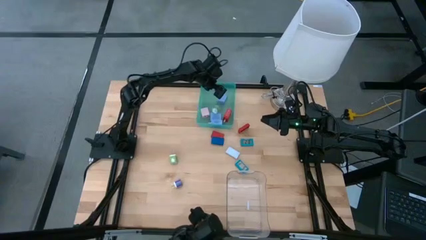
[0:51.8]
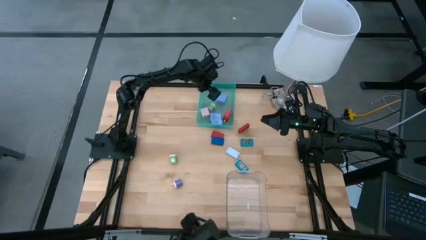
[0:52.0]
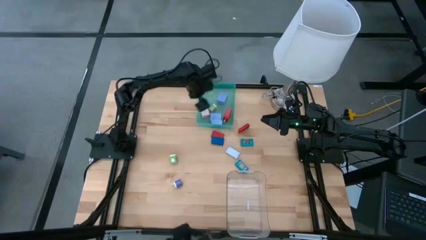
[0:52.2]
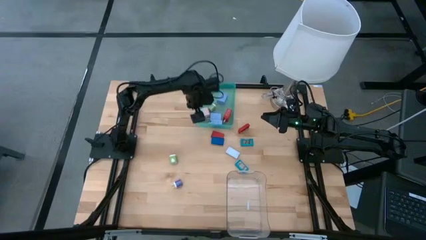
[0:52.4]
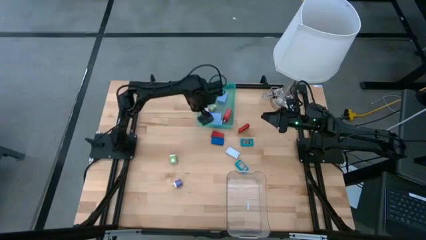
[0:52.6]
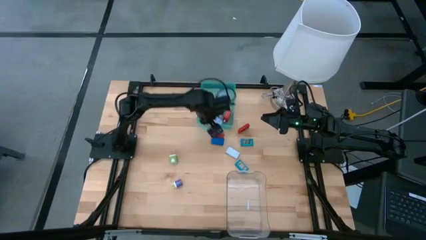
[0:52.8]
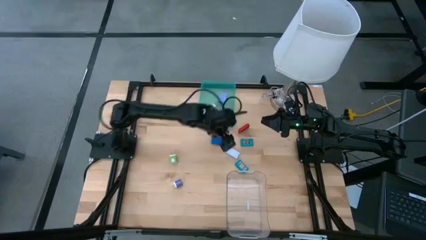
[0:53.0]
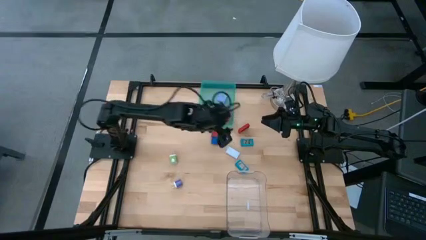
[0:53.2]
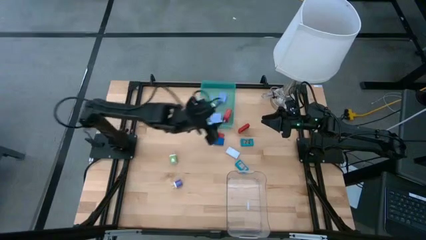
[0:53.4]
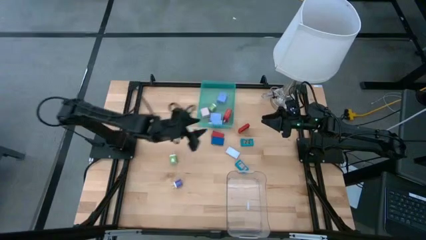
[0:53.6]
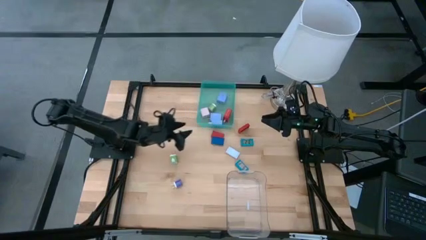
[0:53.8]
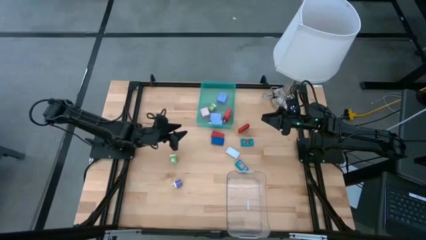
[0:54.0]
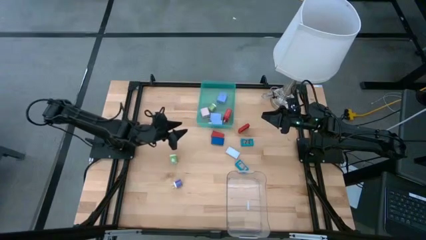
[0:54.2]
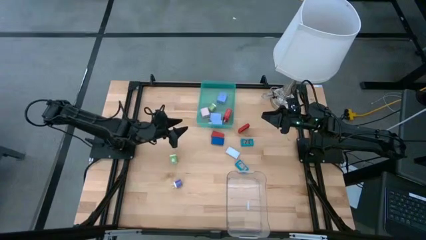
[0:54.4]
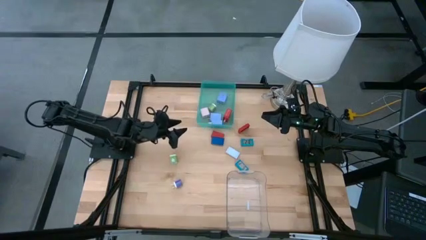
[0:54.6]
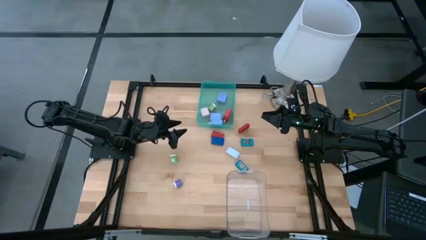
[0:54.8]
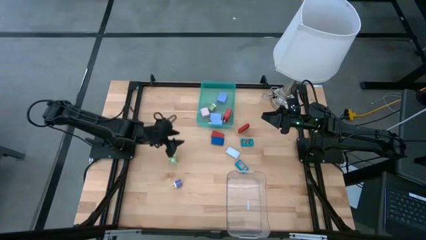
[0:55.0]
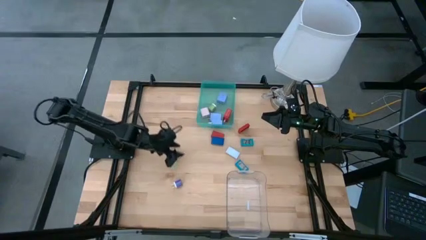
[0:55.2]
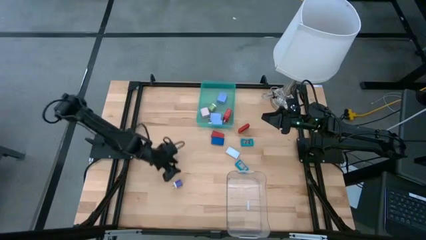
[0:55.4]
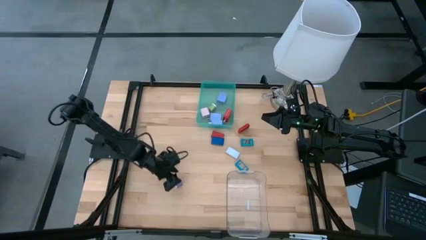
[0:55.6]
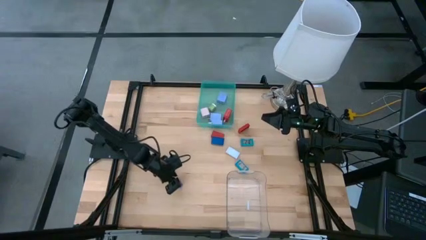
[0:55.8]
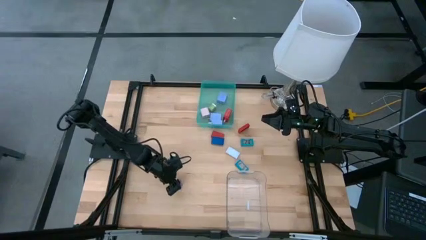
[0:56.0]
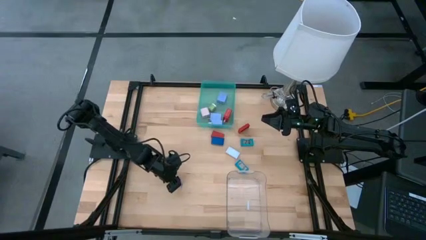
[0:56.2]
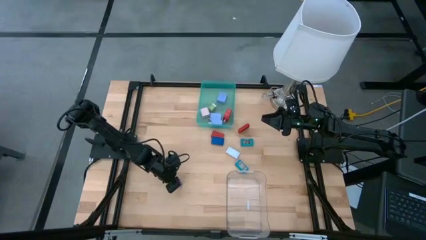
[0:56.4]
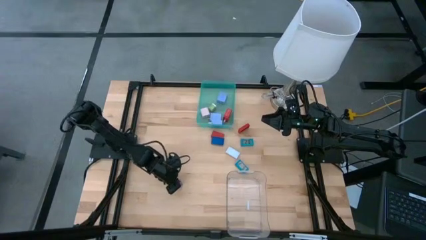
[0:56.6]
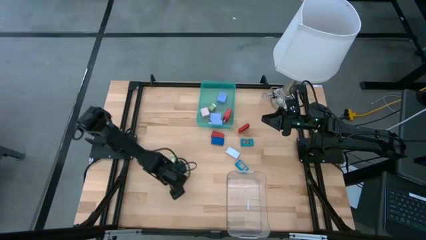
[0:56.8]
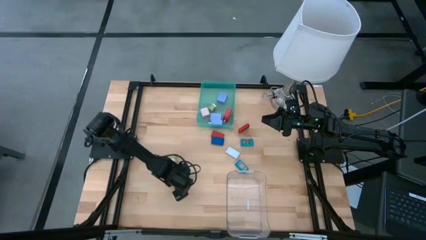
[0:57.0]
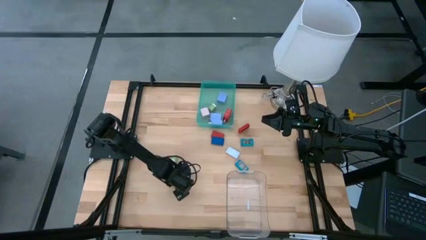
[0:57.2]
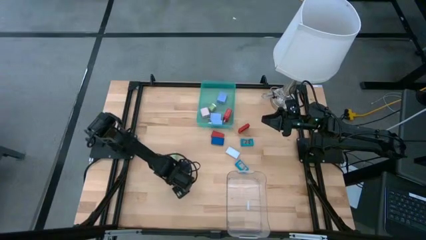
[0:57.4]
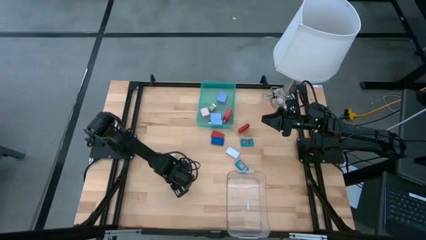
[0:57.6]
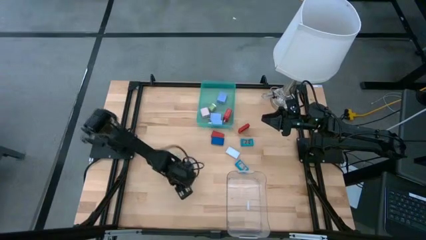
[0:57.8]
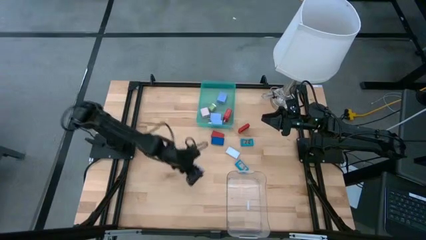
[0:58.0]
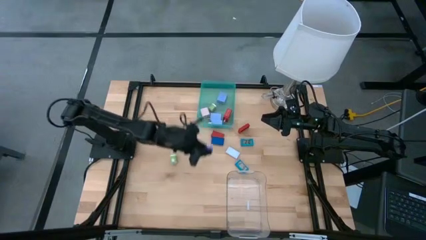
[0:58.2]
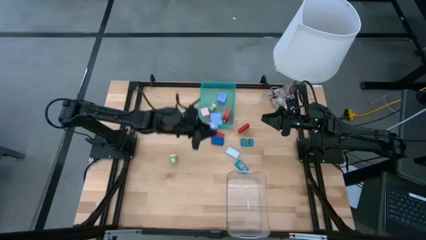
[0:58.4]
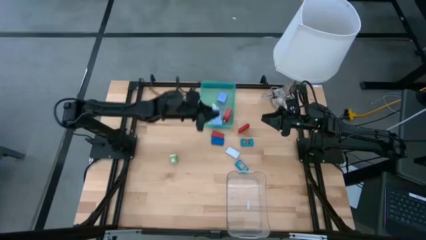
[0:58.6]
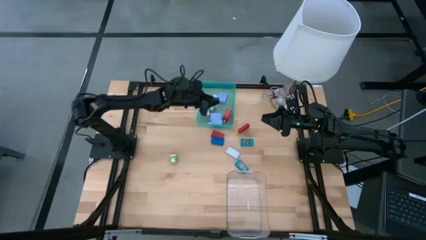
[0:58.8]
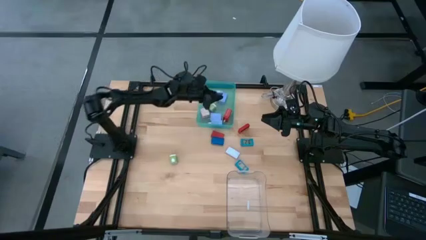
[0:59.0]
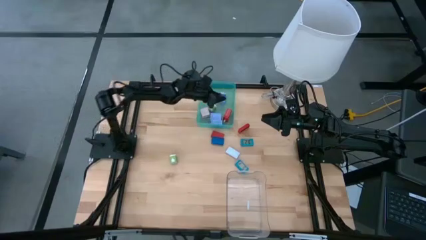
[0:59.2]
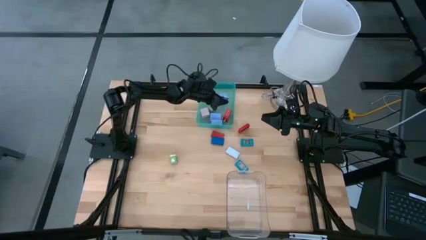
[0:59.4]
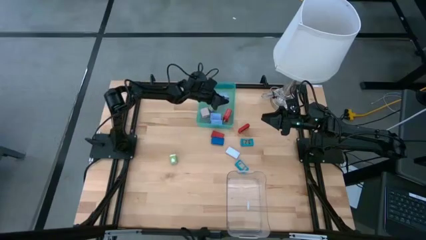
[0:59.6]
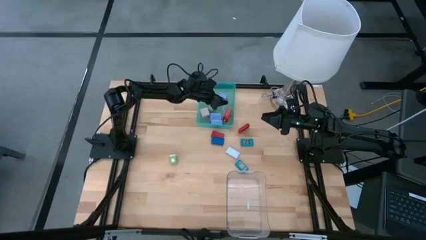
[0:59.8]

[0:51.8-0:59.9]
Task: Pick & Place Office items
Put the violet charger adapter into the green bin

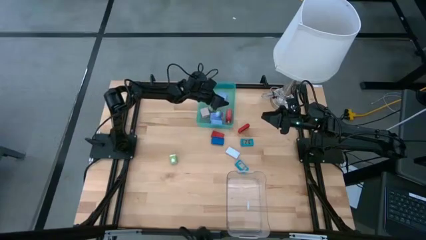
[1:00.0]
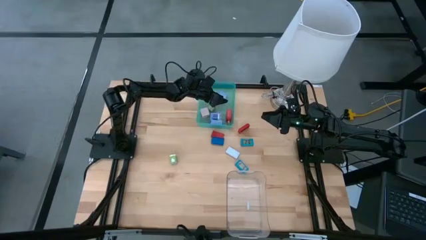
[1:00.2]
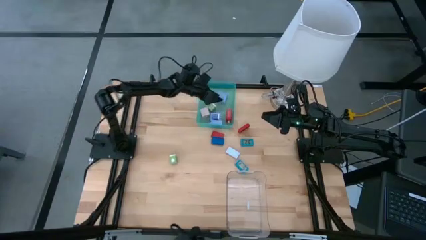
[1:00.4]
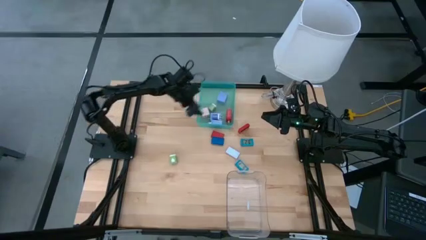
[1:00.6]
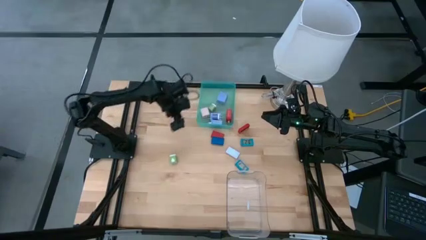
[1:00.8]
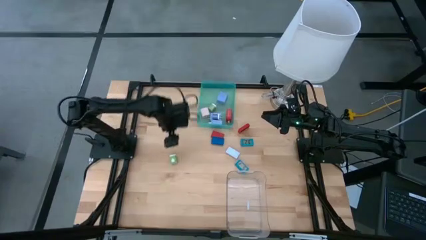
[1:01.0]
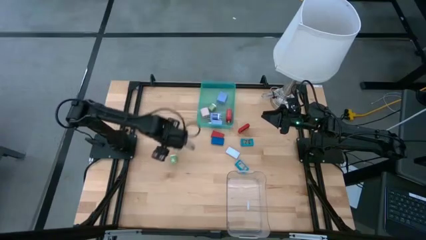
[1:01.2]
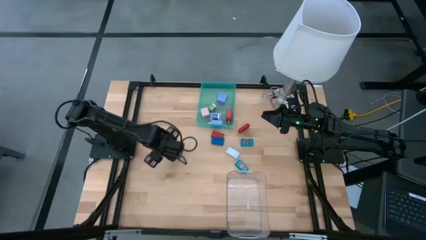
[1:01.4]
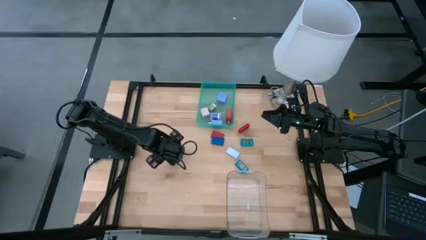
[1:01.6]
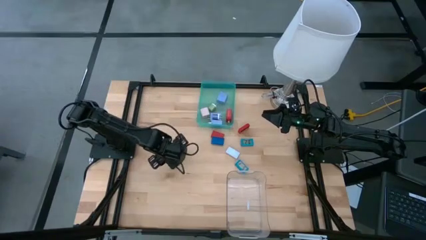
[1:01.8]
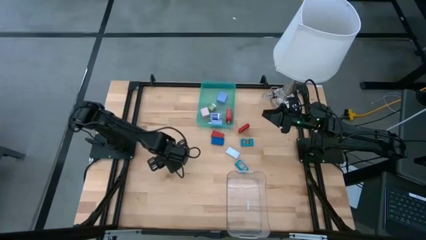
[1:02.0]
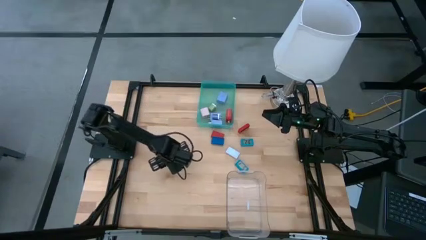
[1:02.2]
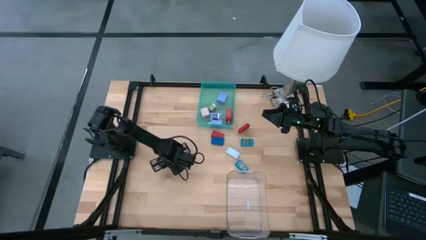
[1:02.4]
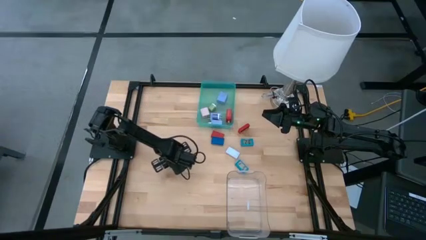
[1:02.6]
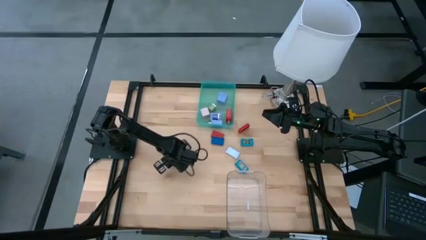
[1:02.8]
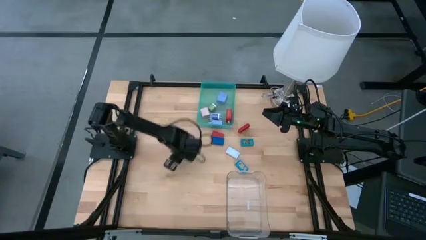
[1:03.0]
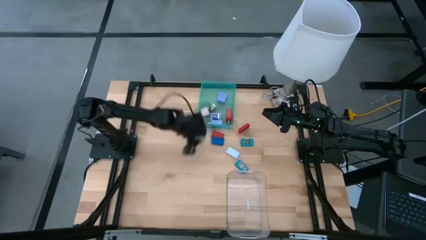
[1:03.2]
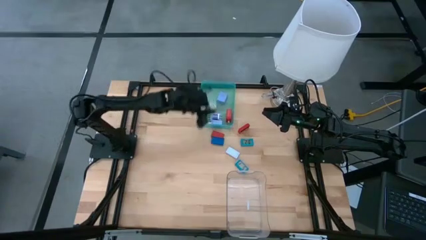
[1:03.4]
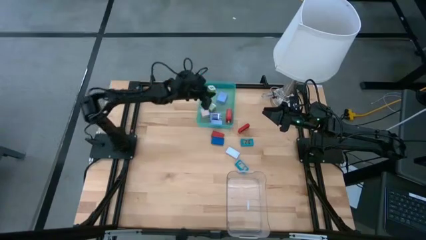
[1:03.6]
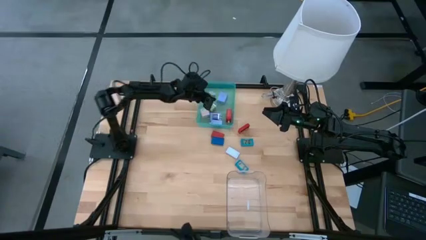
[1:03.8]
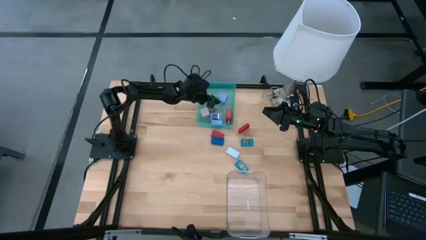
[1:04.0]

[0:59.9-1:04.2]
Put the green charger adapter into the green bin

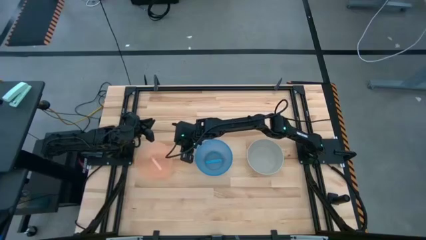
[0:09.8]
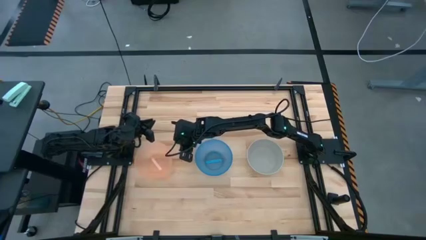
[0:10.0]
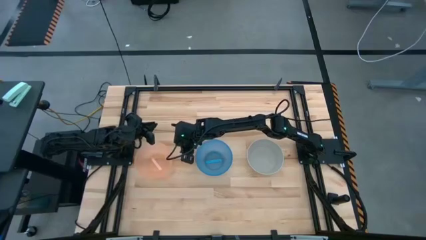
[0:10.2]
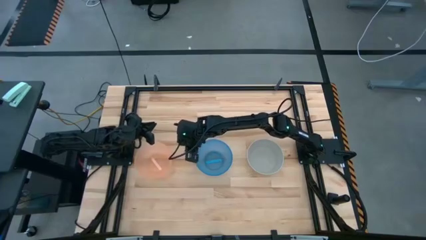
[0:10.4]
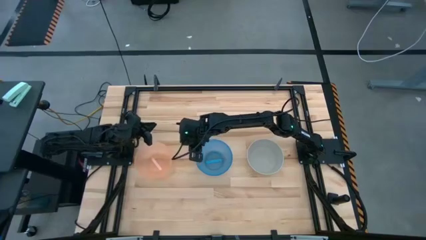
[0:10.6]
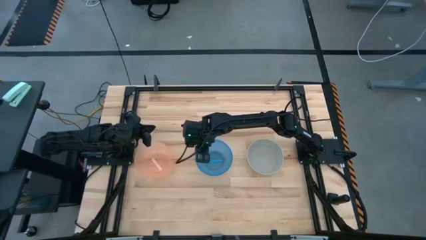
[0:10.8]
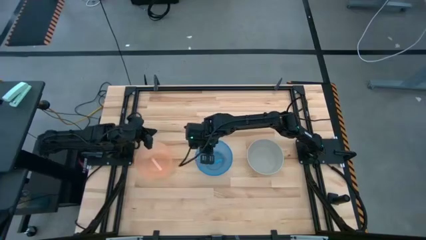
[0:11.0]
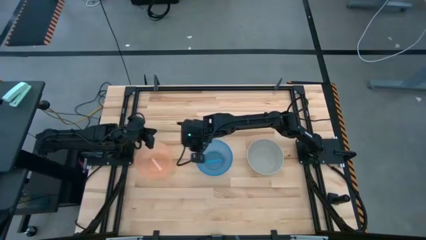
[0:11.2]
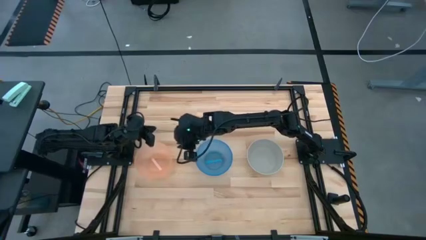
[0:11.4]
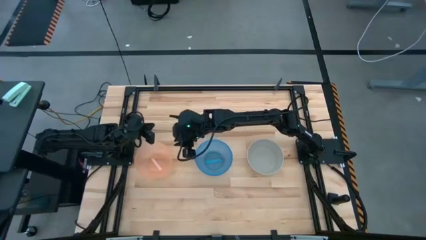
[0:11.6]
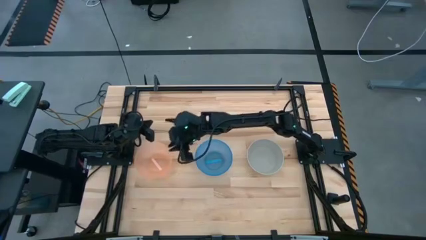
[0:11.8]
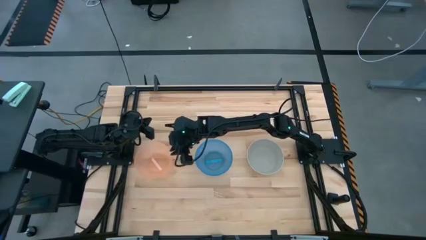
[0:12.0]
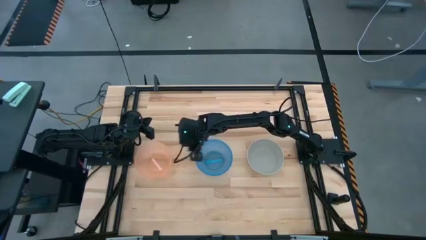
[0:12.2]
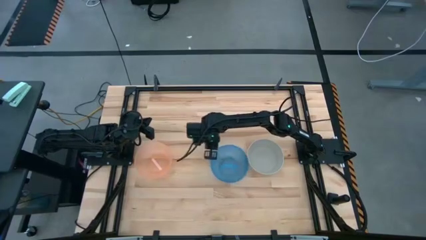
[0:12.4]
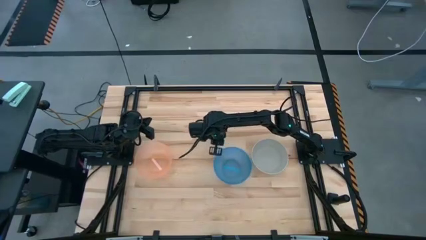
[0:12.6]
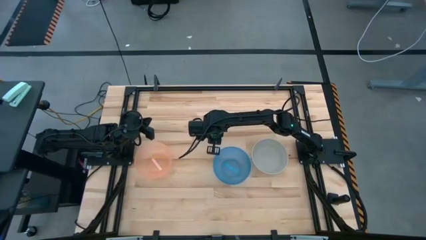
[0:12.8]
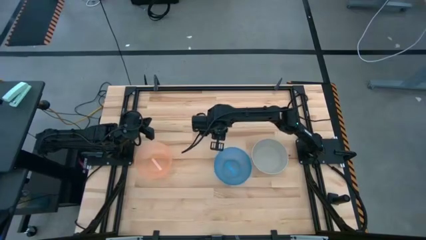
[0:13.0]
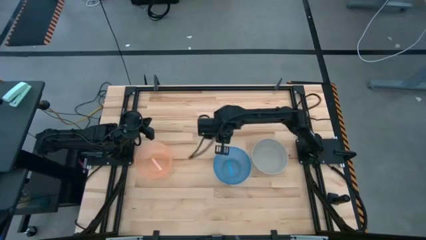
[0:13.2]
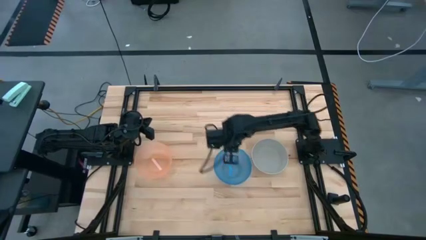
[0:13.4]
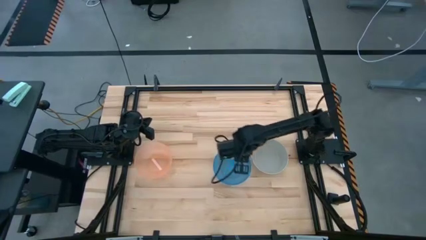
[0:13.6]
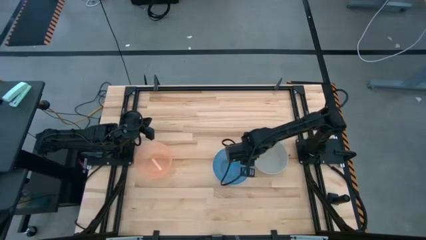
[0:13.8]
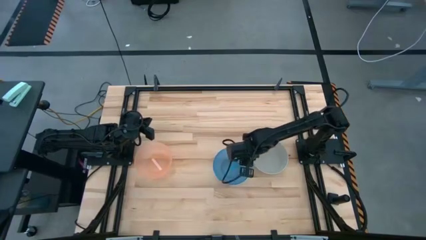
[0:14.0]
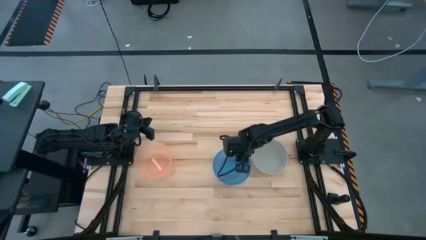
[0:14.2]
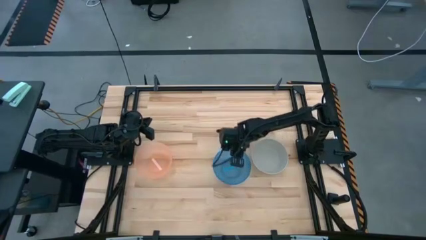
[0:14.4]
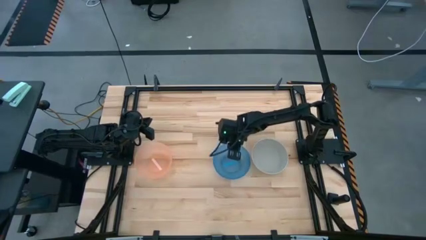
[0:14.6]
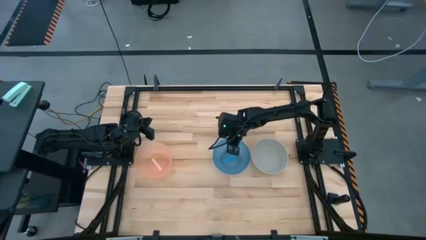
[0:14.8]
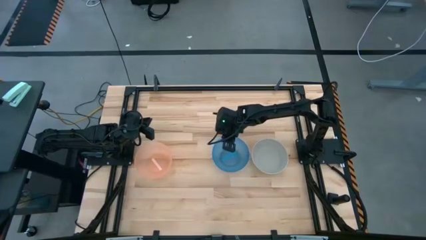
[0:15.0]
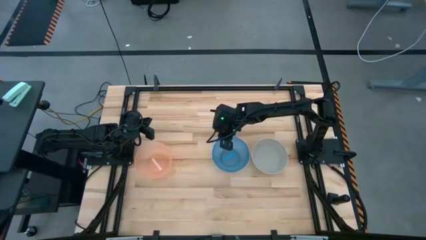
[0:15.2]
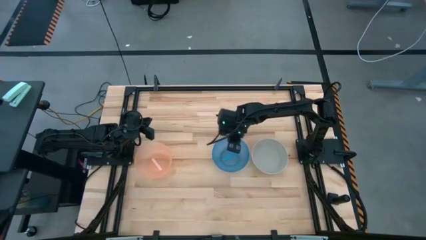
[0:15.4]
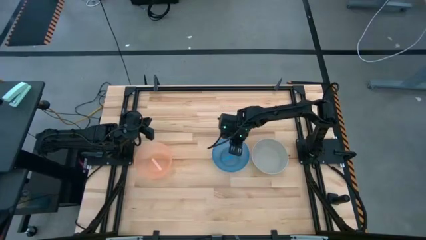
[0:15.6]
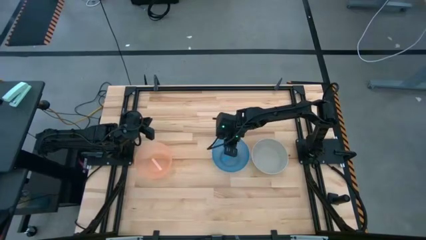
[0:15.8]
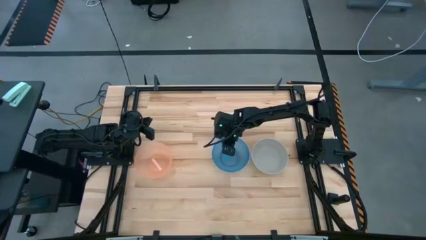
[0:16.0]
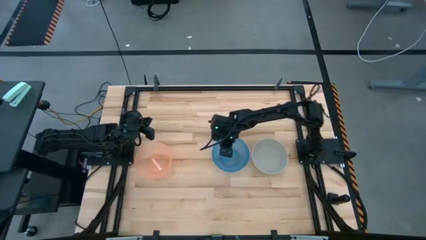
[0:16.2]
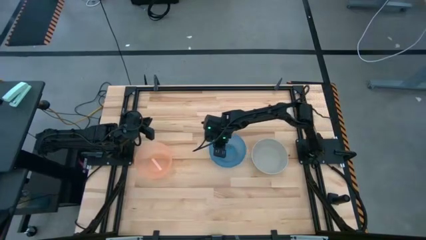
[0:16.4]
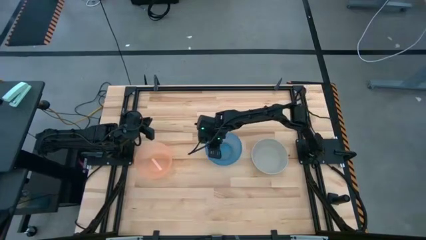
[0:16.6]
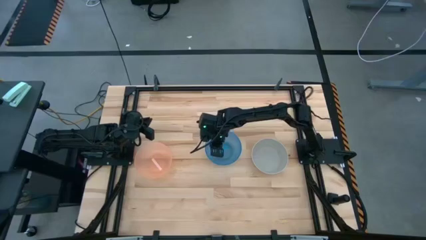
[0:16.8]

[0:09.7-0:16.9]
Task: Nest bowls inside each other
Adjust the blue bowl
